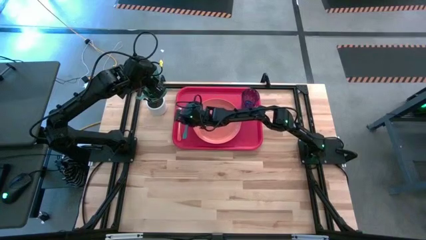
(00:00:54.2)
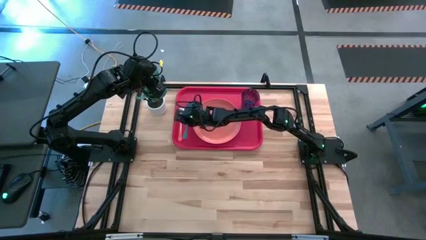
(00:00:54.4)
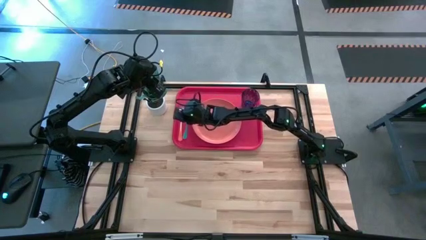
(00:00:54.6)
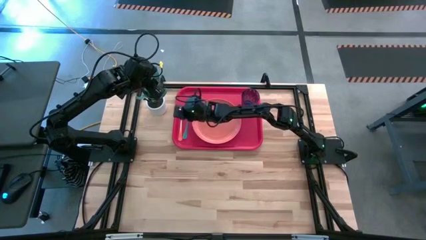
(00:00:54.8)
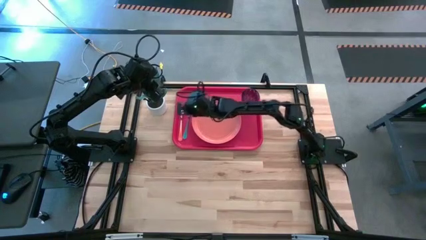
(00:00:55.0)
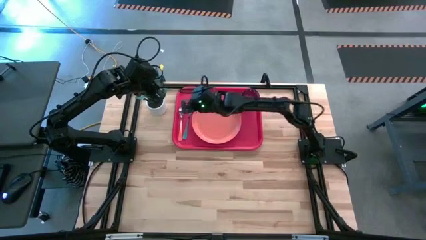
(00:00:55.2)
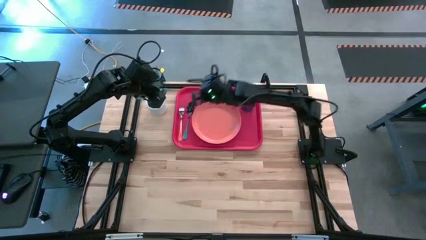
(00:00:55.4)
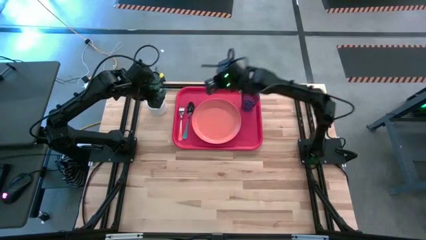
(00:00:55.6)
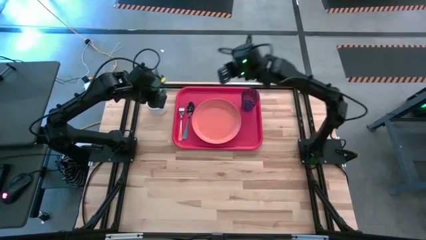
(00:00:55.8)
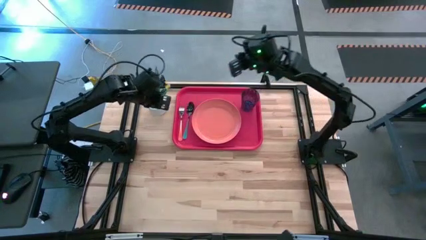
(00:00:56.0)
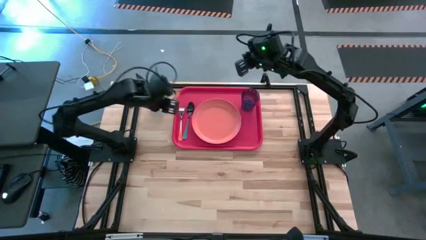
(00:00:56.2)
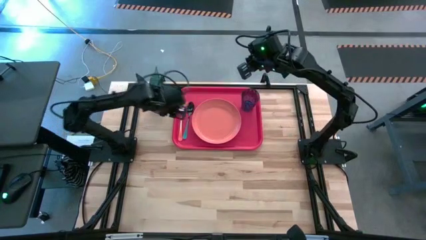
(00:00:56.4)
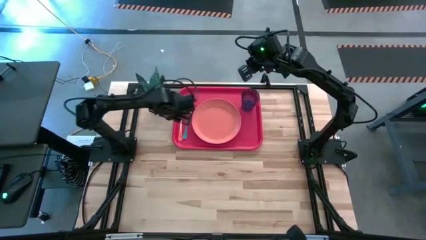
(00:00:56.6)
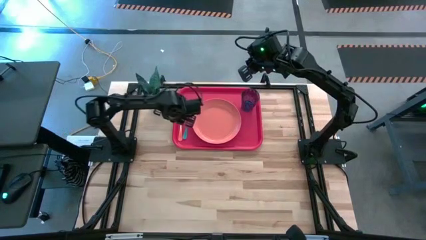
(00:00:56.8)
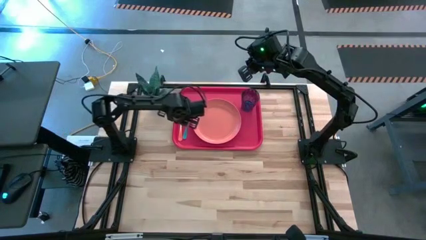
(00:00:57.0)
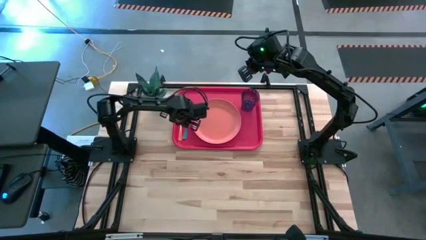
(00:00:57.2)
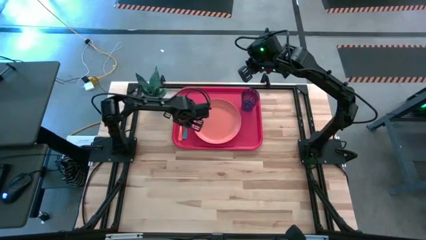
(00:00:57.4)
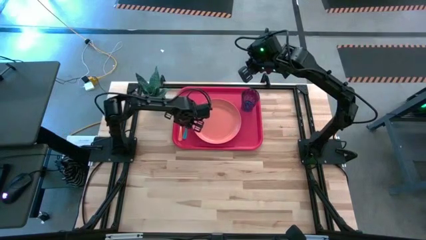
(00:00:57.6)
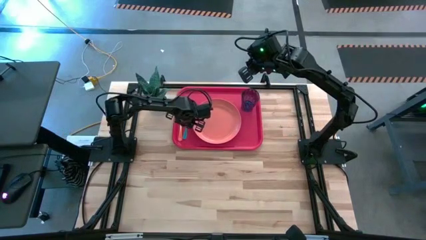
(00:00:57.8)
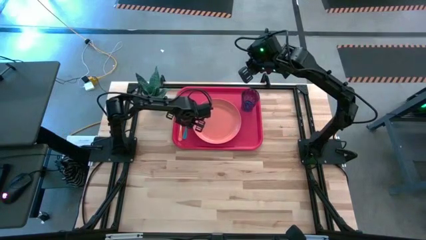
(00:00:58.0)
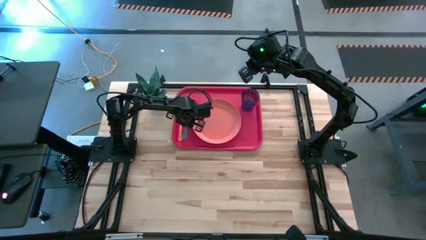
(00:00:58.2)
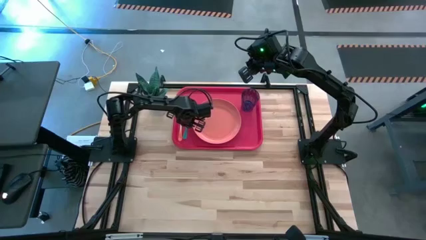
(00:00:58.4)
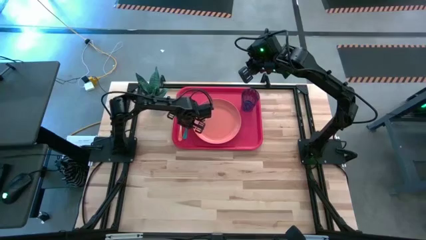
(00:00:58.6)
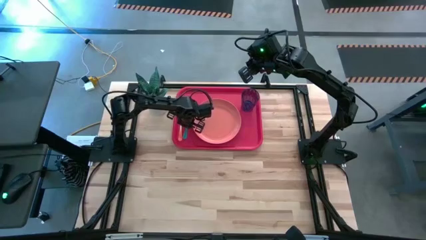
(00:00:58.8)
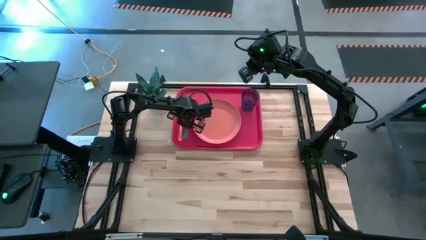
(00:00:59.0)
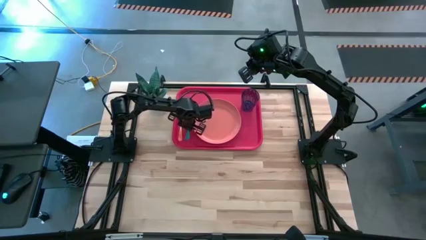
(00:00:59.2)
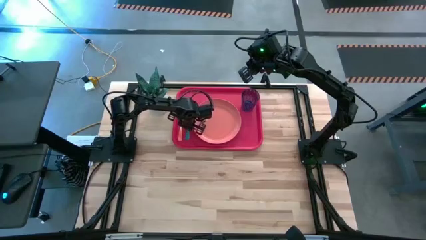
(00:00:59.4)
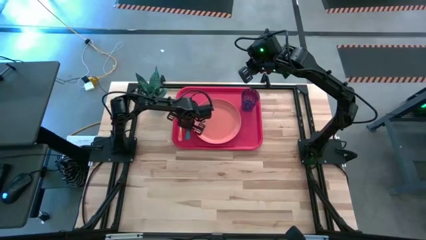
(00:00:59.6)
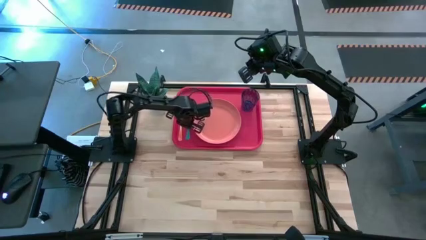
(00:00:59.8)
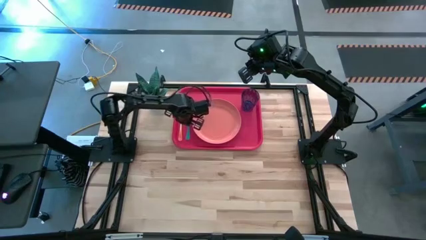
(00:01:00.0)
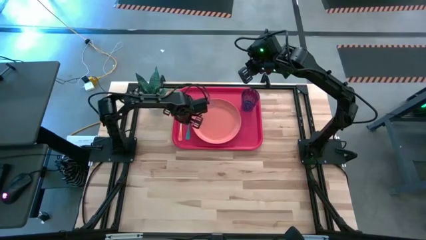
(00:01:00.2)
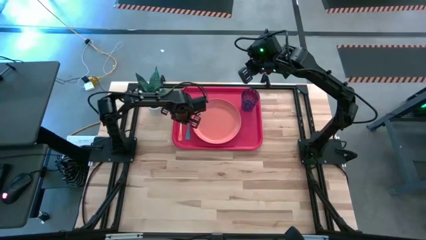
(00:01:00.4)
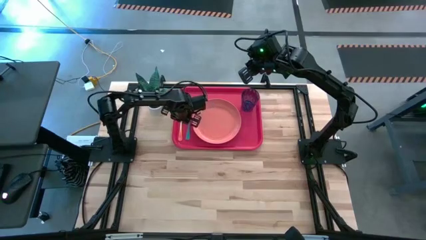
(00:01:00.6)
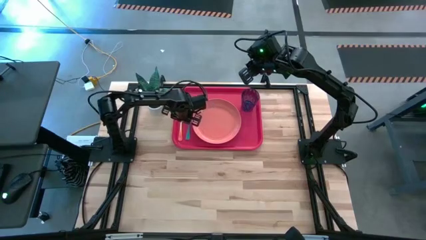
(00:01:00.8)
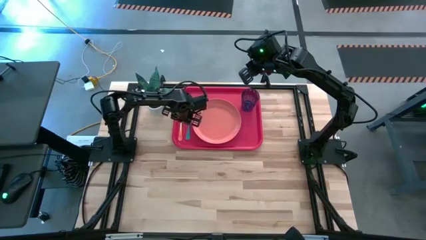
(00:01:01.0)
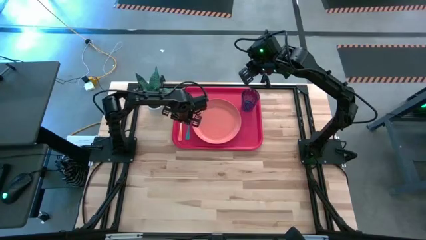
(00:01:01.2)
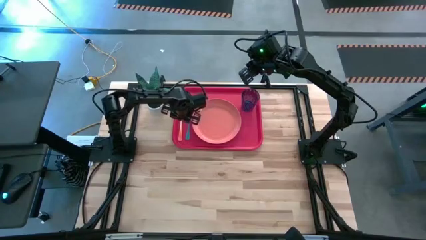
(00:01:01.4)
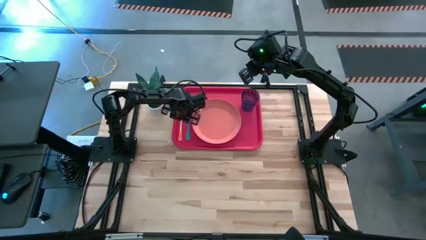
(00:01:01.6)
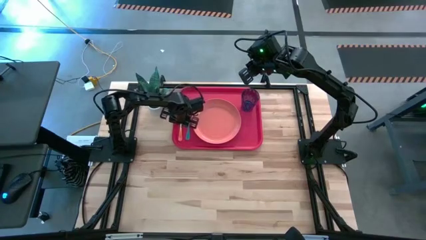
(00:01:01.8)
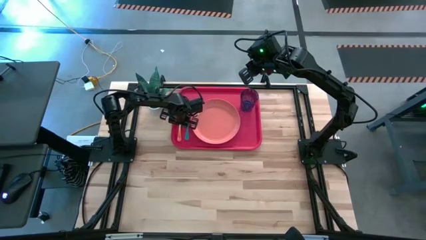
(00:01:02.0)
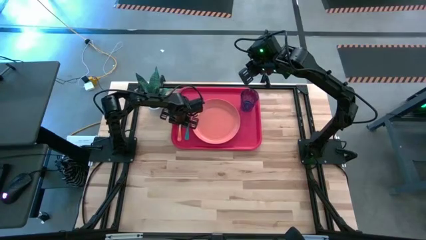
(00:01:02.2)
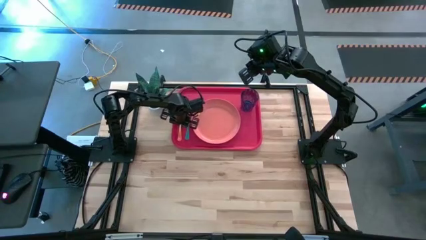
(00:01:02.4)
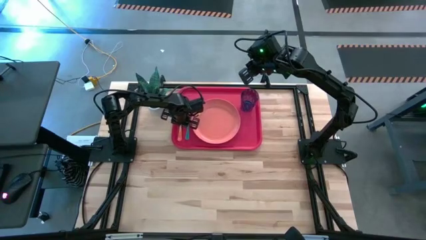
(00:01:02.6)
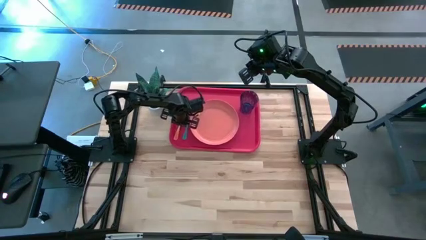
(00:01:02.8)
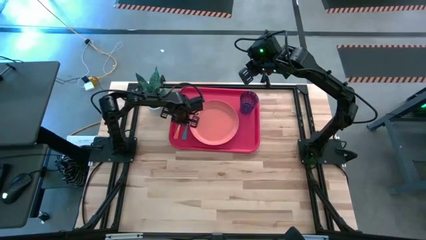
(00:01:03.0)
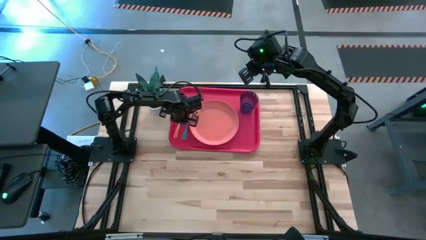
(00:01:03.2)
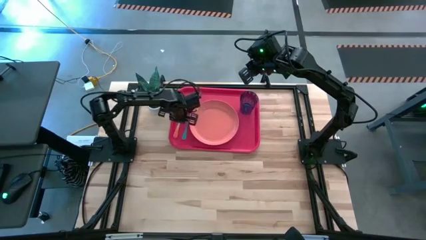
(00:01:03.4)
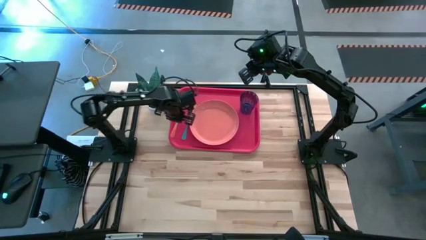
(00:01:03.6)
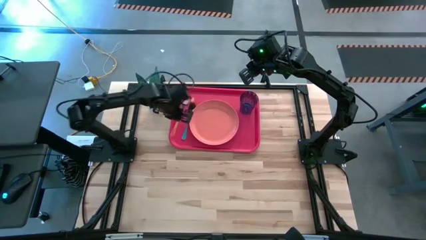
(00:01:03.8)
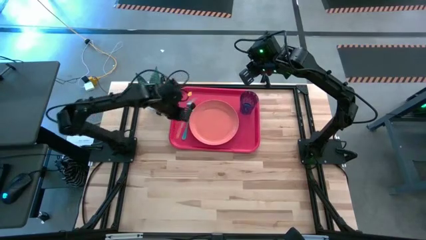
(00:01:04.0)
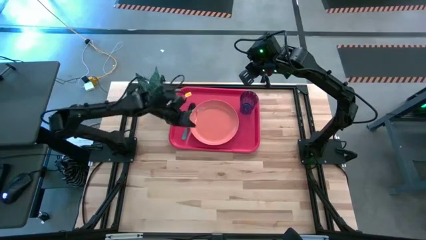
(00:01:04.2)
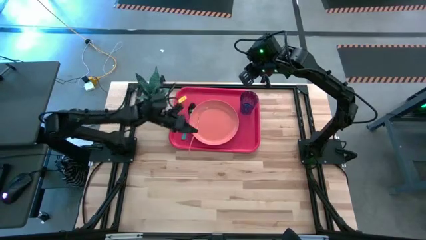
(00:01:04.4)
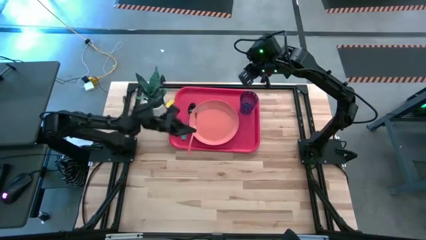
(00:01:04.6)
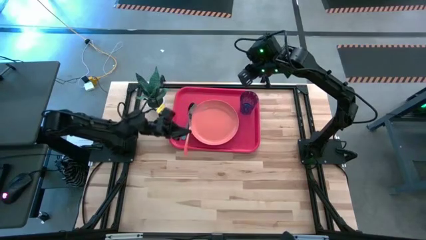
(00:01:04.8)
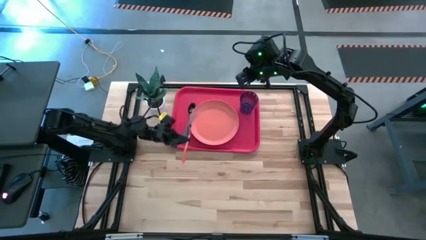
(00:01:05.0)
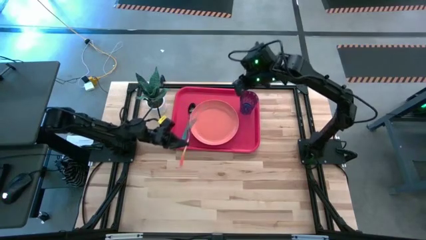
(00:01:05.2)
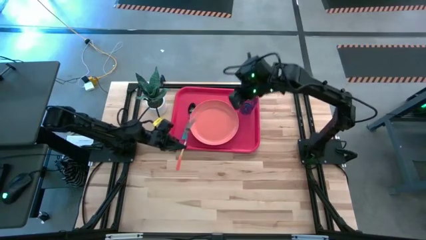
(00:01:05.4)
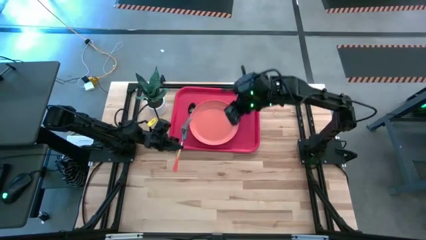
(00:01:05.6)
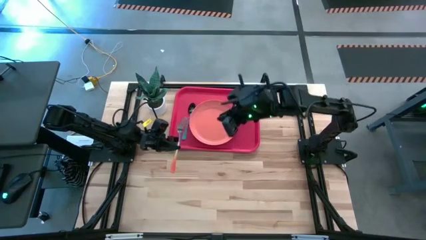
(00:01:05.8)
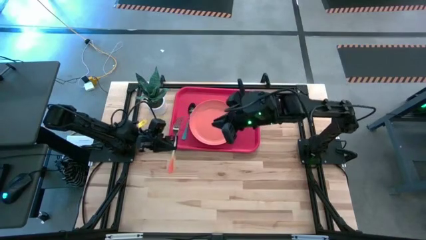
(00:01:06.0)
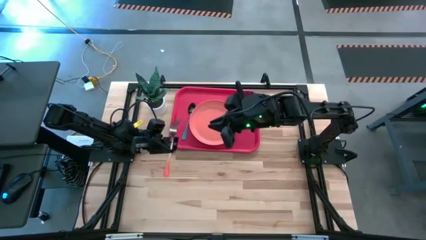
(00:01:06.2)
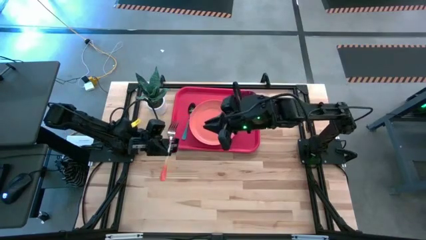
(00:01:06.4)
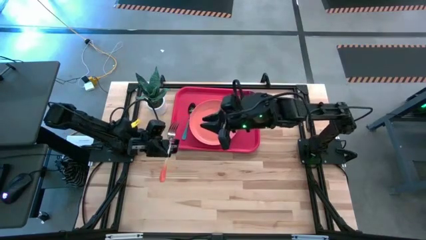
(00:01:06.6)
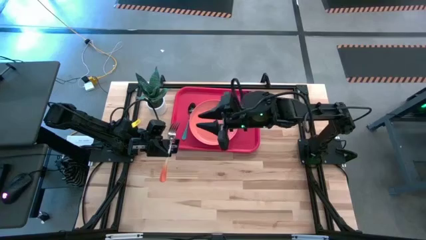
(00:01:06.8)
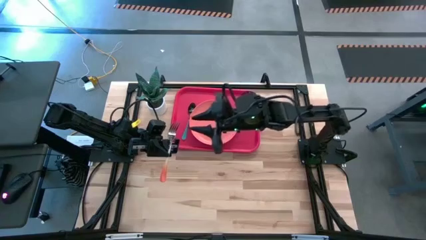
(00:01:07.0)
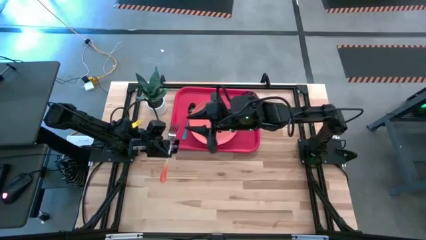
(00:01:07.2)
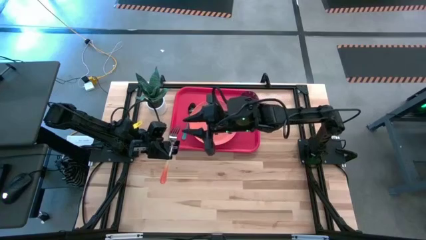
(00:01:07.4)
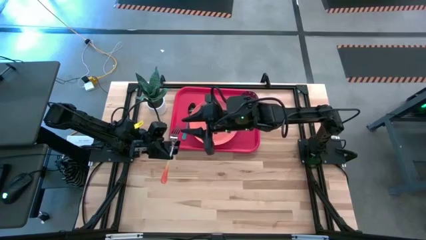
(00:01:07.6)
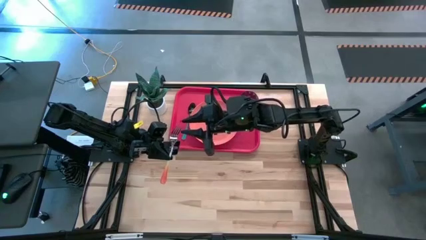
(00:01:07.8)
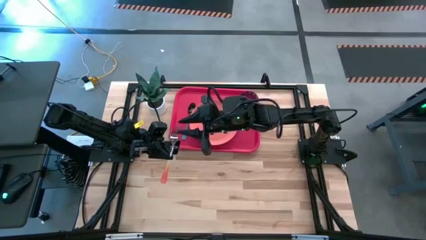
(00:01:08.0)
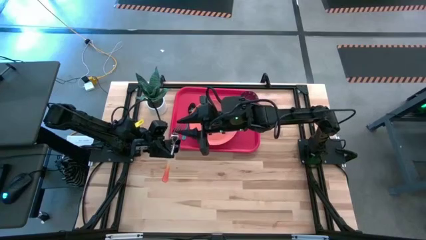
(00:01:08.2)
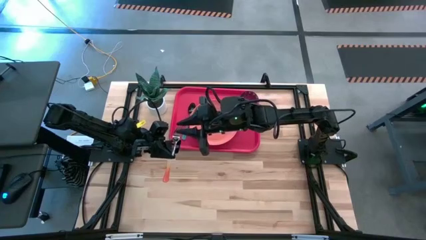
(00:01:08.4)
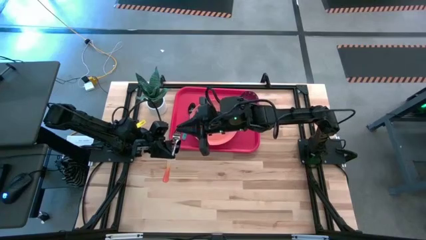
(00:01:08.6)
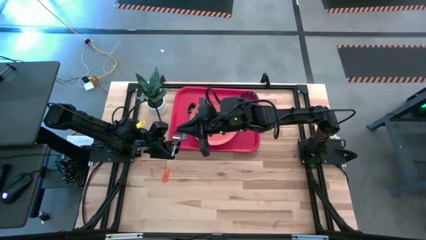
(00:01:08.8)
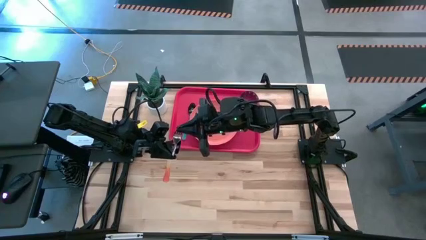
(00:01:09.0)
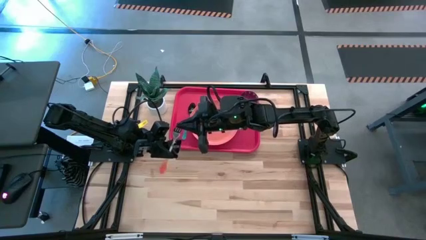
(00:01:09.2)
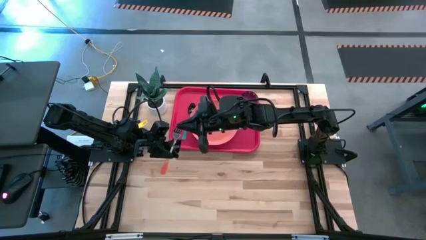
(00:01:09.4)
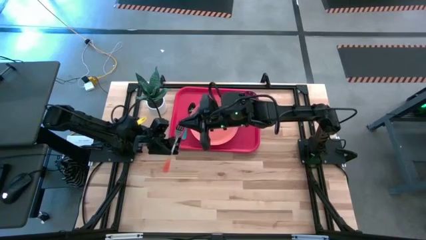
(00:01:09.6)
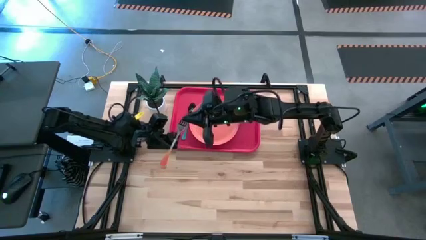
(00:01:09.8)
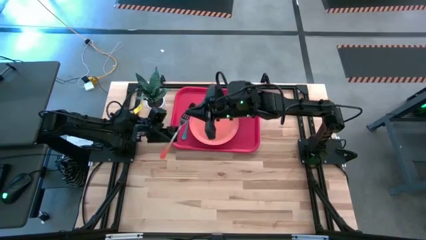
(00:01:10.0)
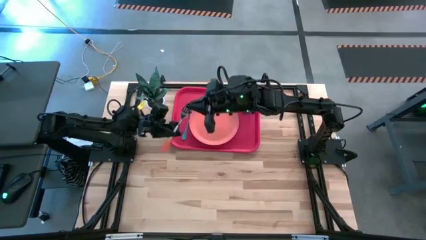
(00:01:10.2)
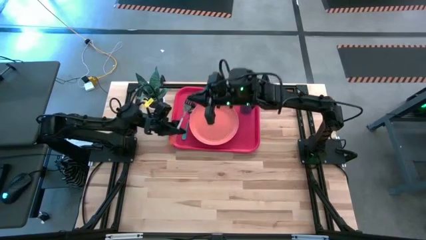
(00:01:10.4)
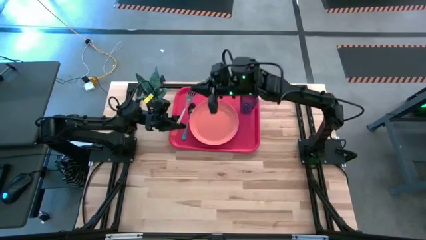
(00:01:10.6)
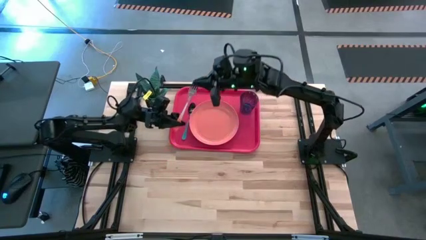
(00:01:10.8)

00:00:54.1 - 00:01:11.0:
Task: Pick and place plate/cup/fork/spoon on tray
Adjust the utensils on the pink tray
